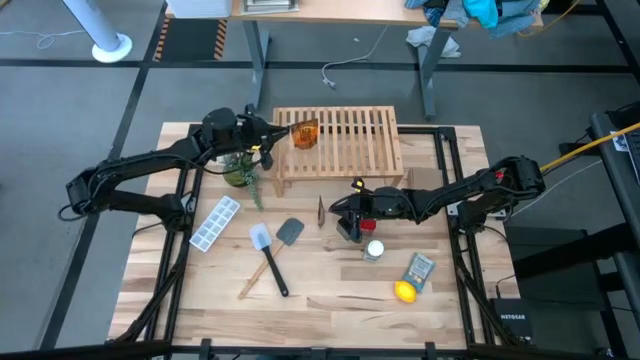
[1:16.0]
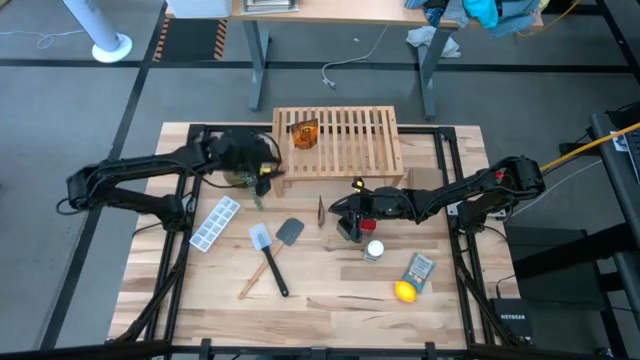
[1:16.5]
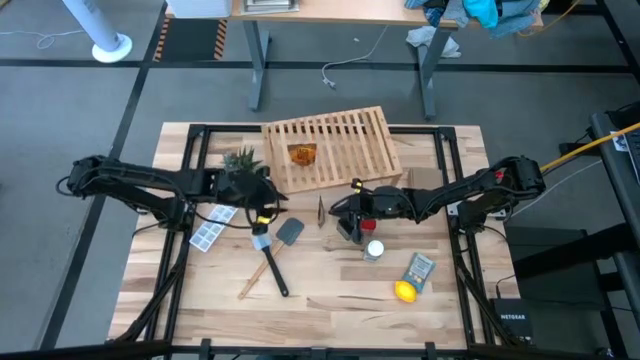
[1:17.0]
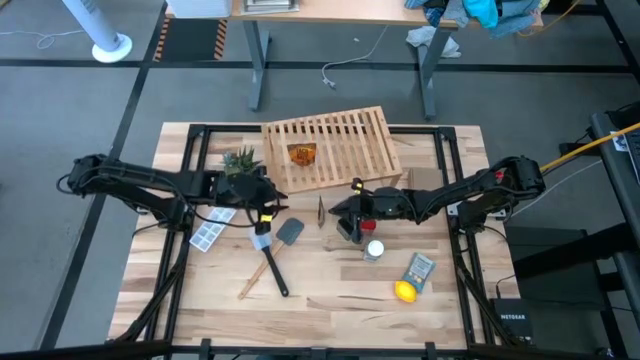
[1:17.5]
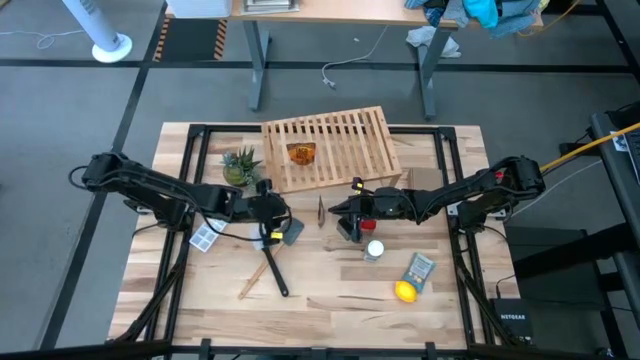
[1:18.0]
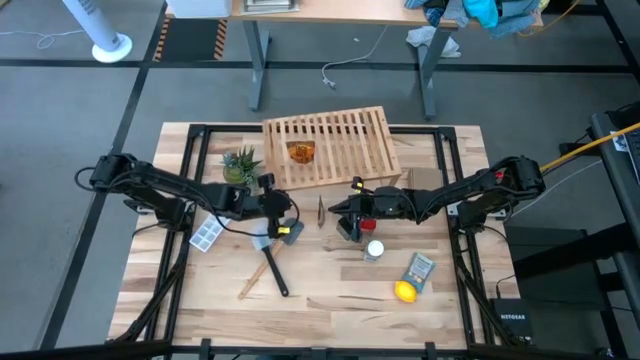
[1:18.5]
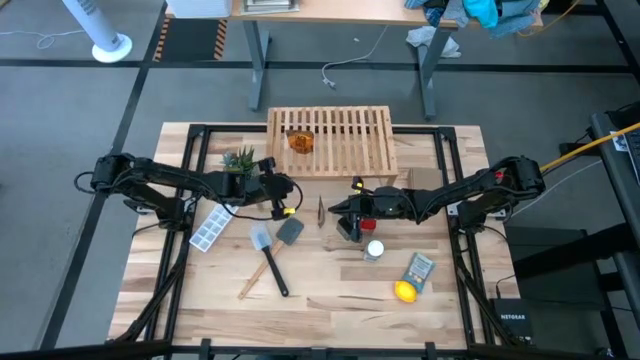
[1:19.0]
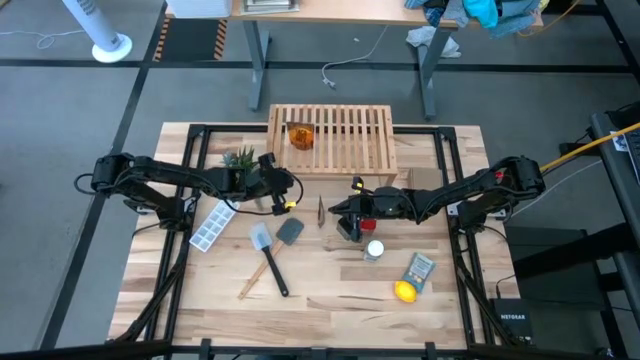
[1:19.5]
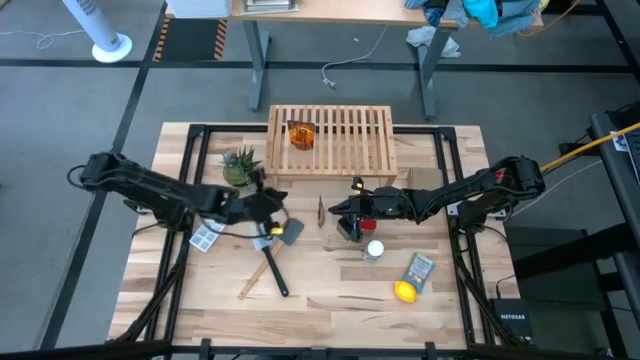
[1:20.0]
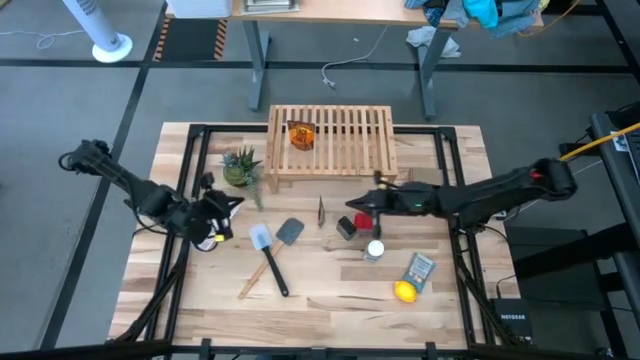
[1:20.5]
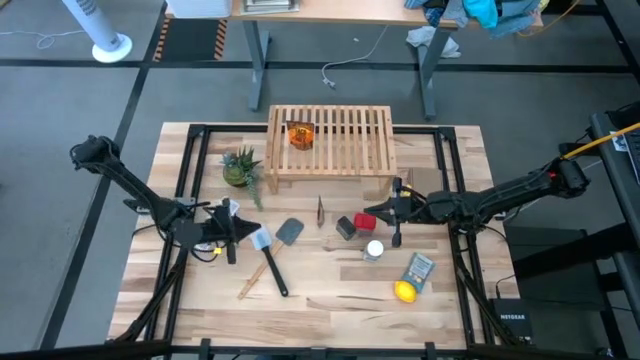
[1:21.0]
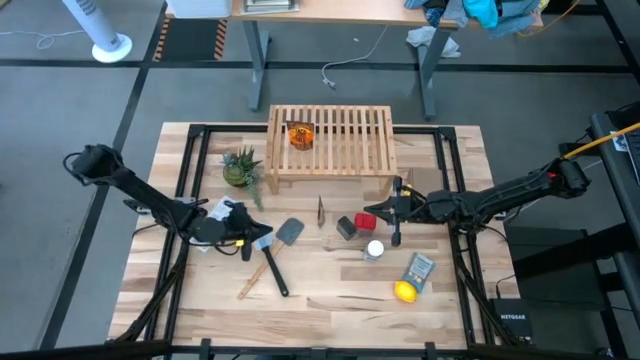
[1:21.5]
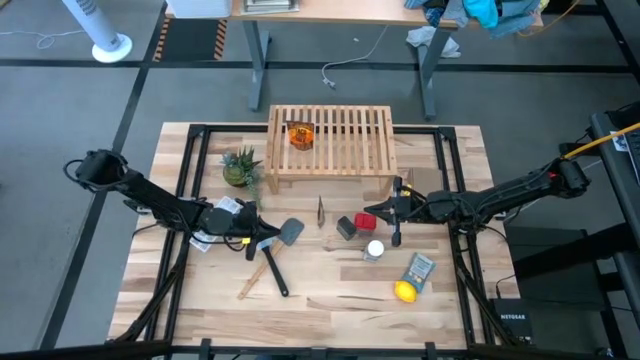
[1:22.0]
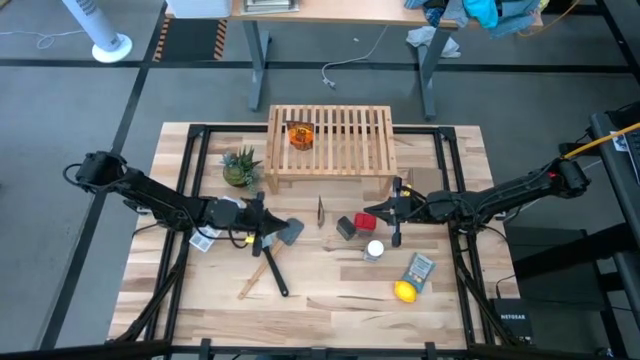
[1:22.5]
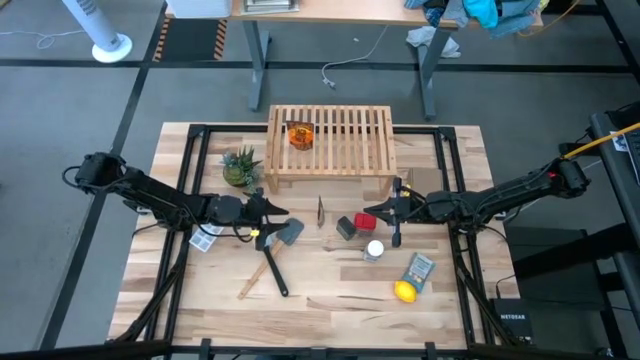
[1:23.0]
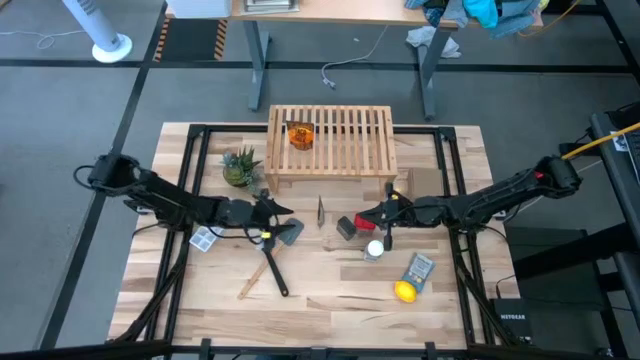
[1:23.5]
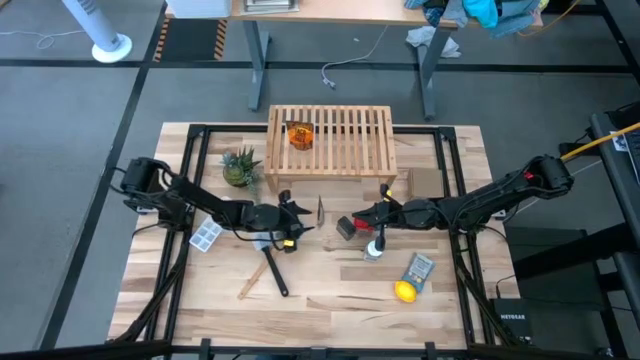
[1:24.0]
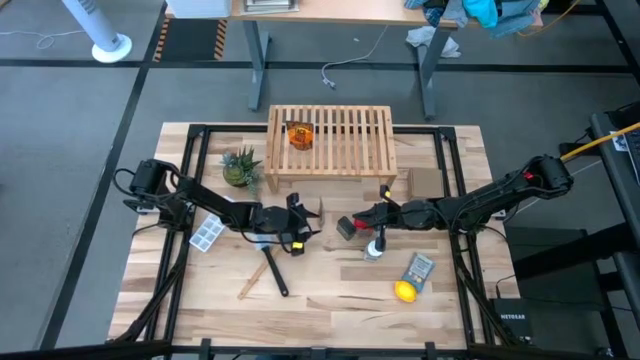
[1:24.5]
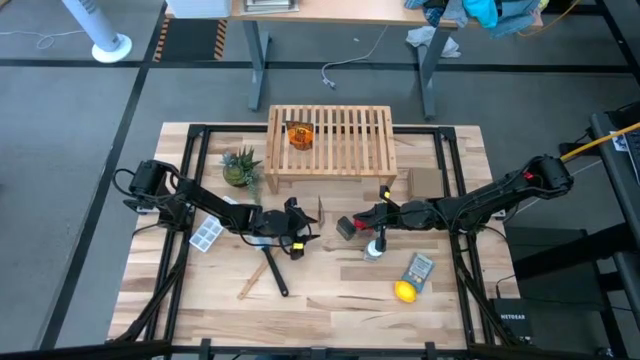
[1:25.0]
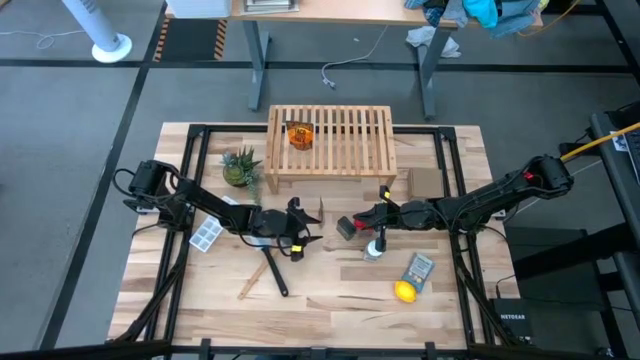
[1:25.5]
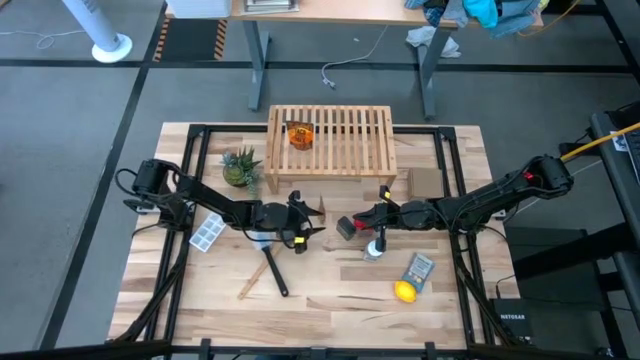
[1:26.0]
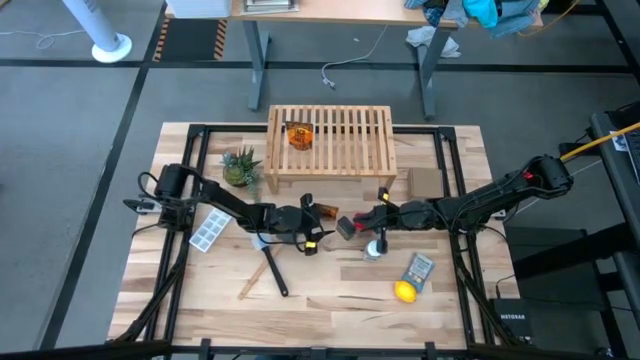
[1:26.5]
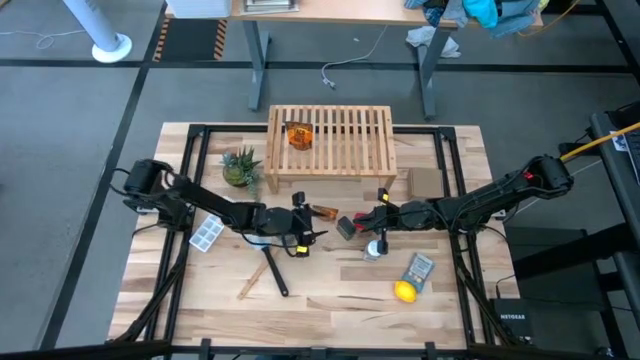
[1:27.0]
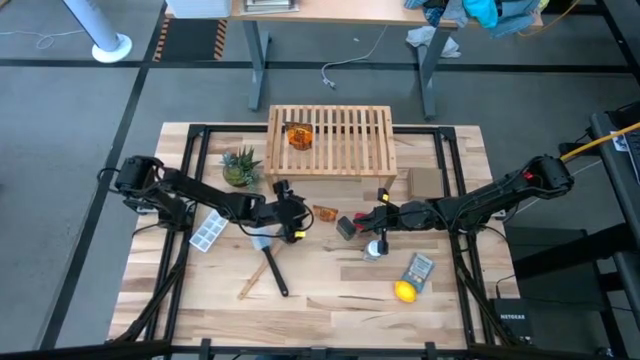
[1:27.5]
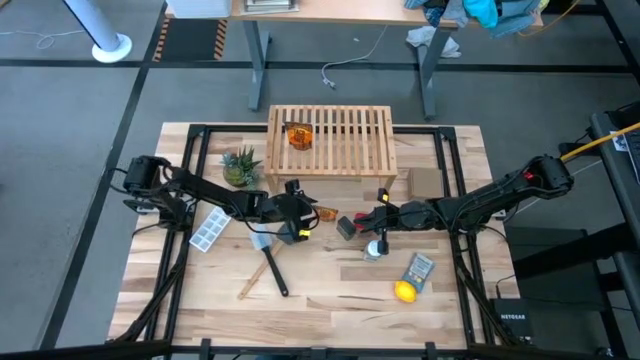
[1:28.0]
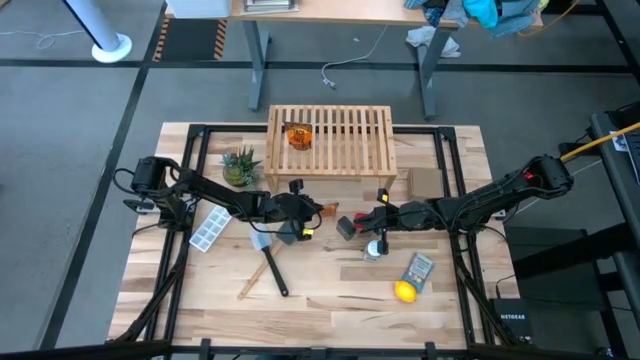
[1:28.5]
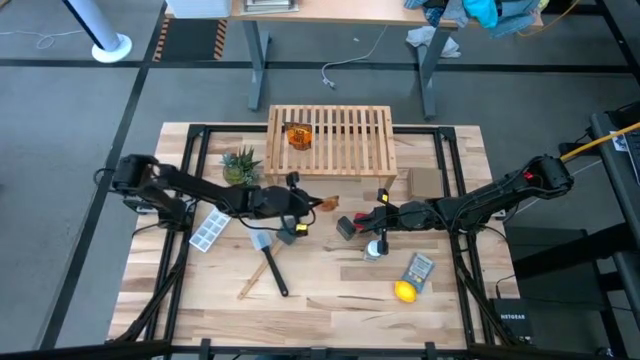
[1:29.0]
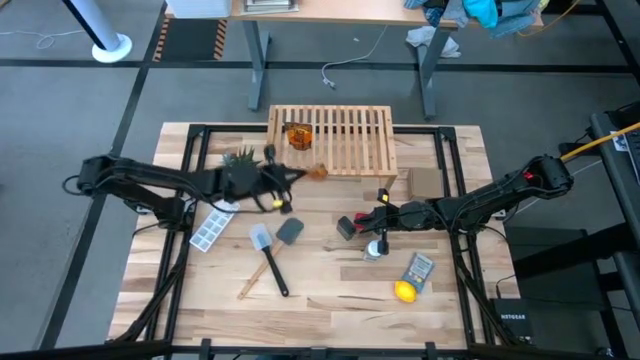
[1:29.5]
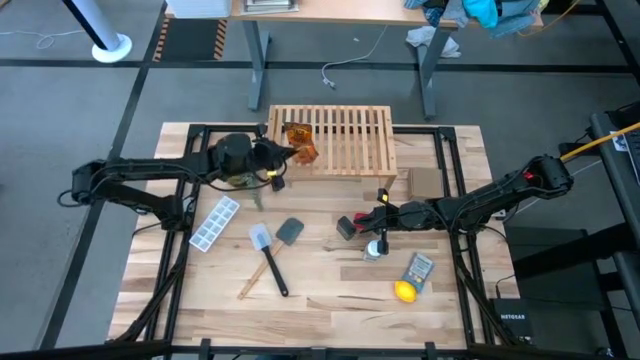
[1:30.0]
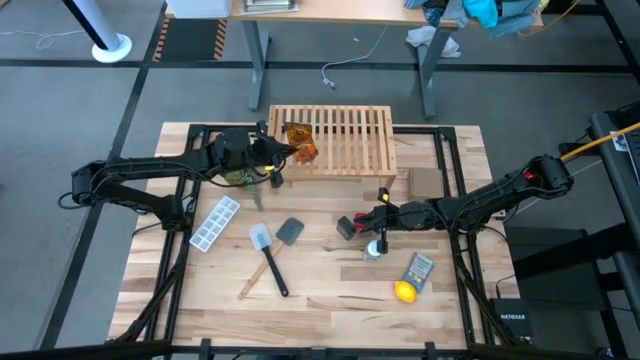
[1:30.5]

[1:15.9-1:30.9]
Task: Shelf spices
Put the orange seasoning pack on the shelf
